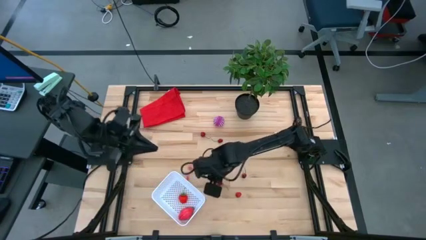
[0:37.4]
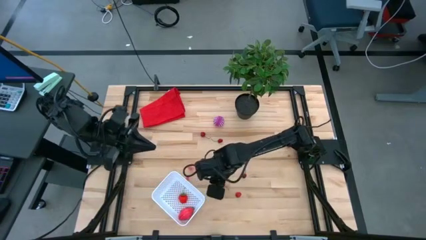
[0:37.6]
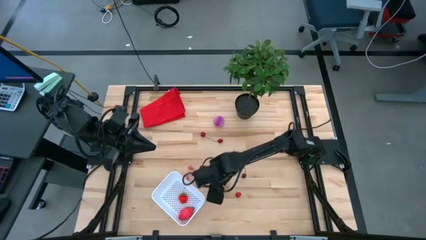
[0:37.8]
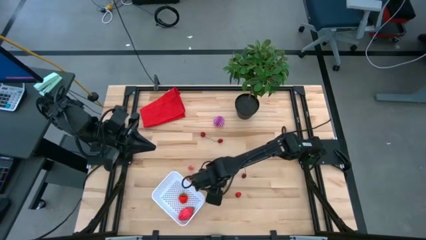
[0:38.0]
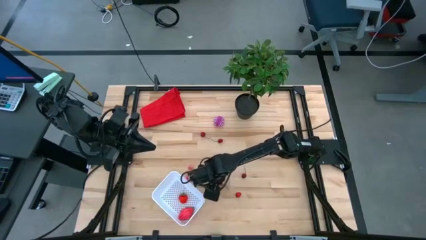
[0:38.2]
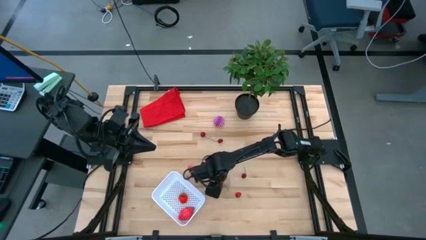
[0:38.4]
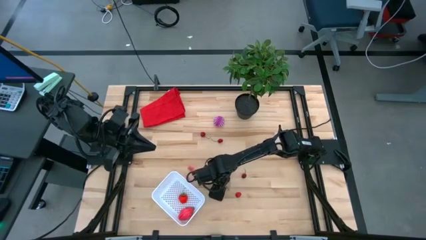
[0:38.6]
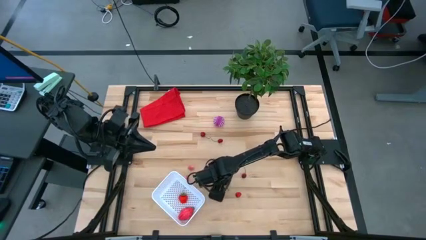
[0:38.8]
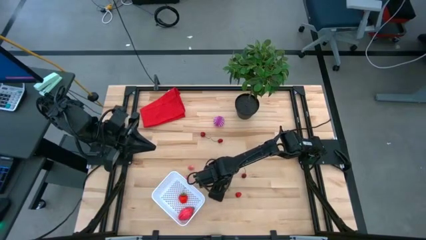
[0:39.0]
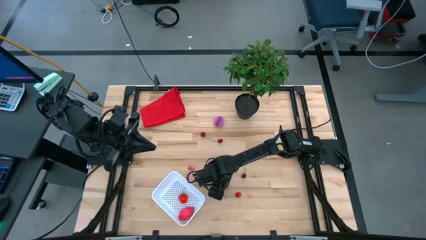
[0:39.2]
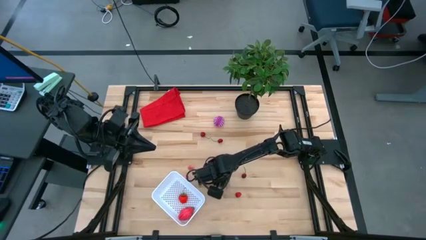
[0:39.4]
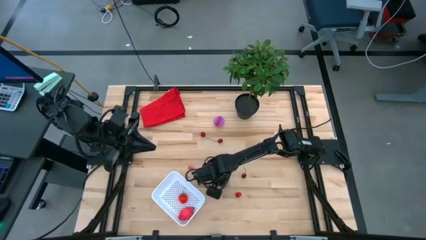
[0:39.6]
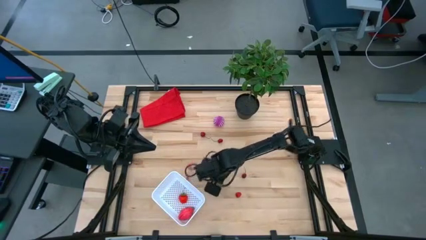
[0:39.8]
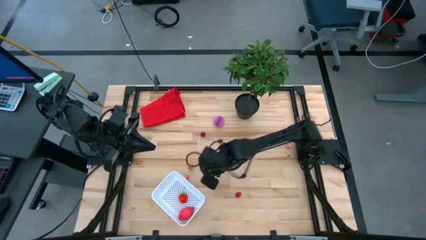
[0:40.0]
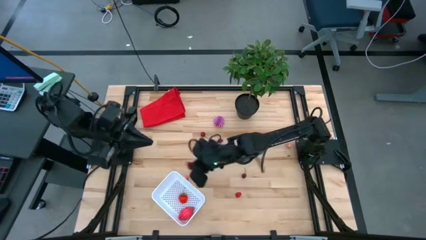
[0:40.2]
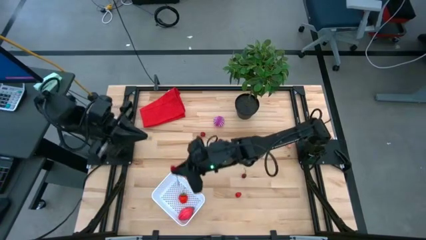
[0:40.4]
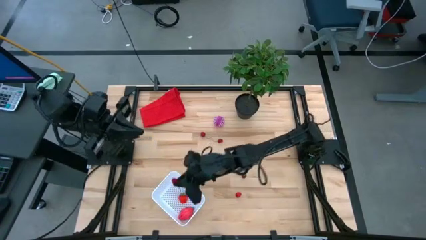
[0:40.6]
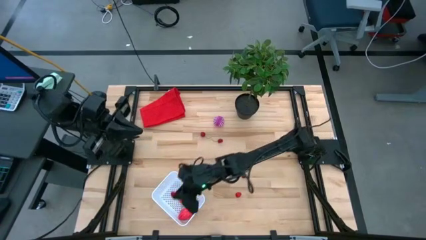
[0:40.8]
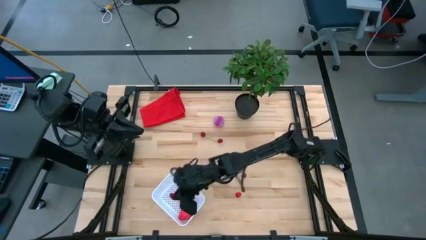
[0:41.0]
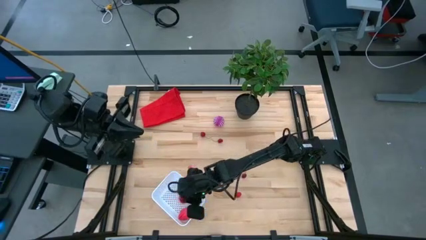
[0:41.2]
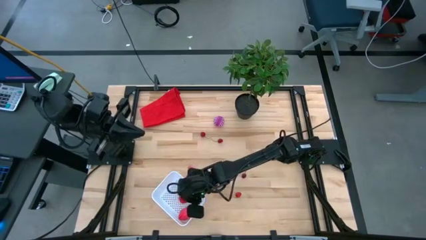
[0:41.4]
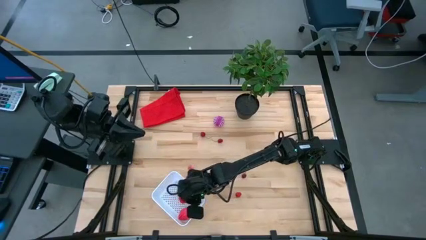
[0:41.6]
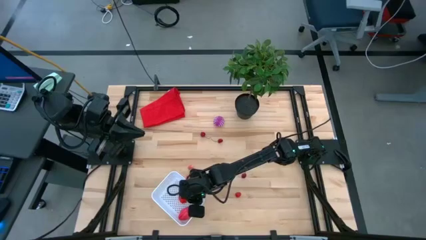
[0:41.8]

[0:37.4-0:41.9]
Task: Pick and placing Produce into tupperware
Put the cherry in the basket

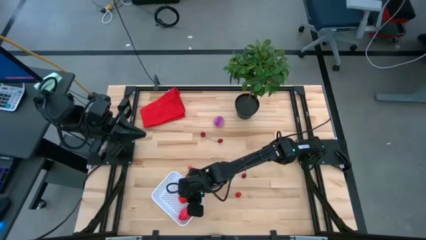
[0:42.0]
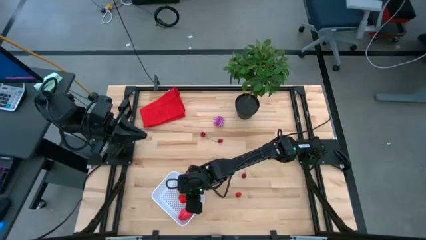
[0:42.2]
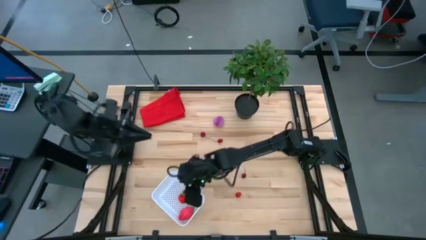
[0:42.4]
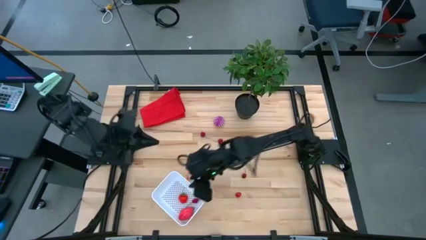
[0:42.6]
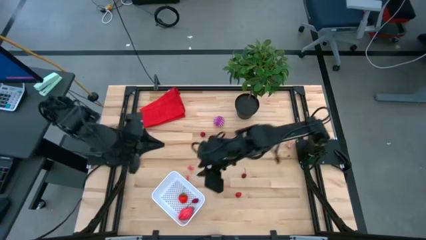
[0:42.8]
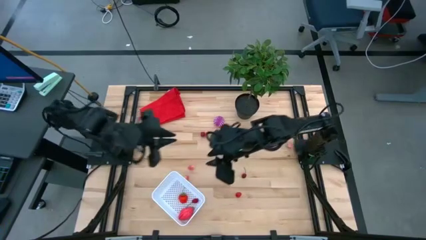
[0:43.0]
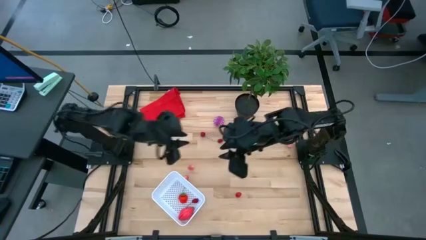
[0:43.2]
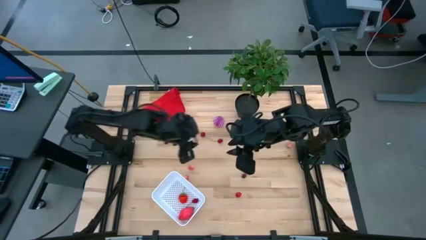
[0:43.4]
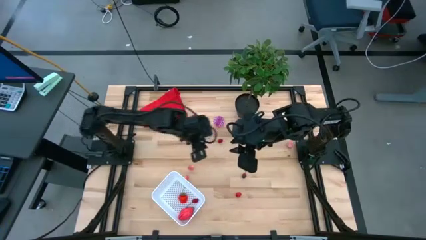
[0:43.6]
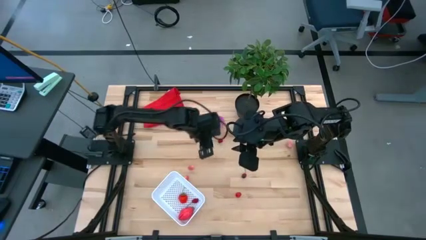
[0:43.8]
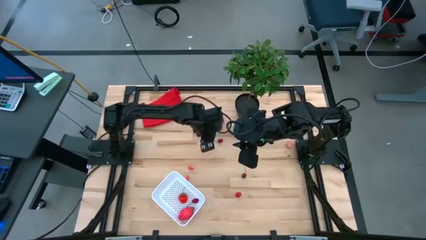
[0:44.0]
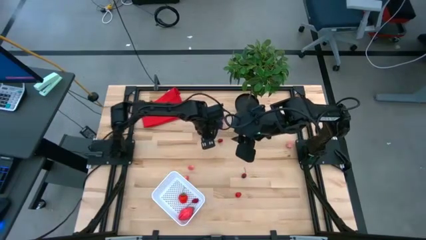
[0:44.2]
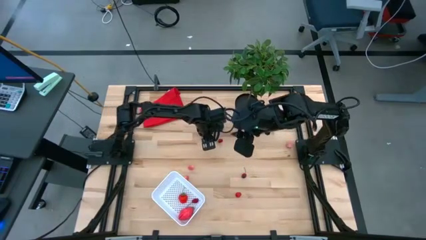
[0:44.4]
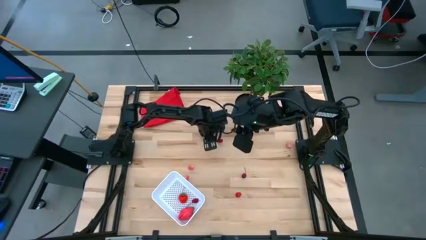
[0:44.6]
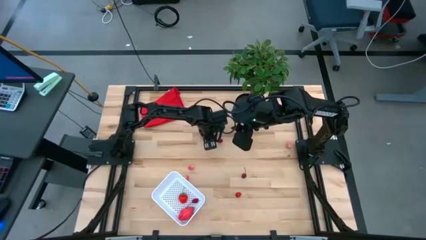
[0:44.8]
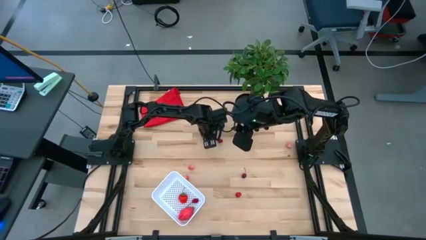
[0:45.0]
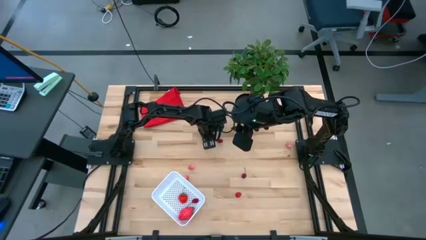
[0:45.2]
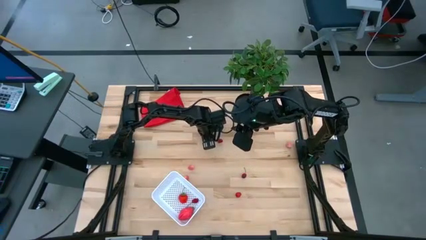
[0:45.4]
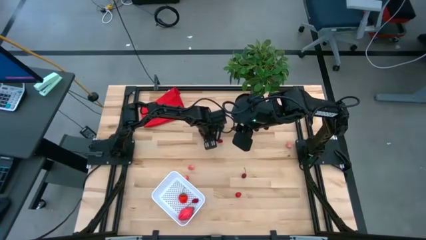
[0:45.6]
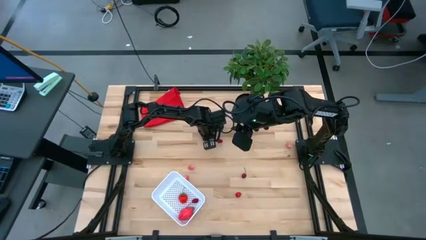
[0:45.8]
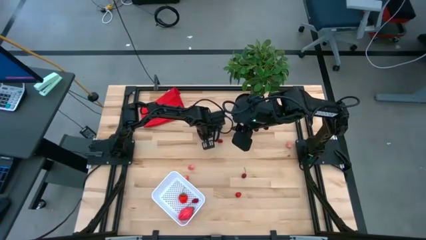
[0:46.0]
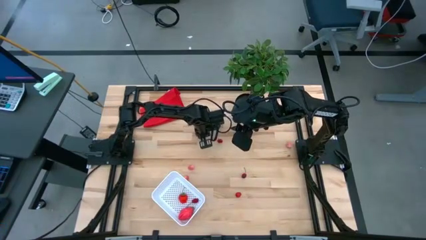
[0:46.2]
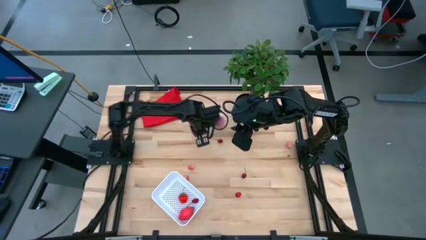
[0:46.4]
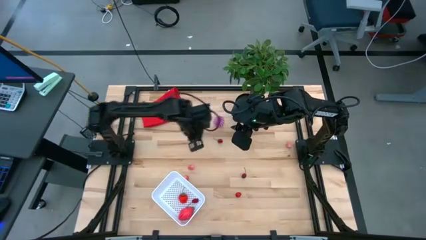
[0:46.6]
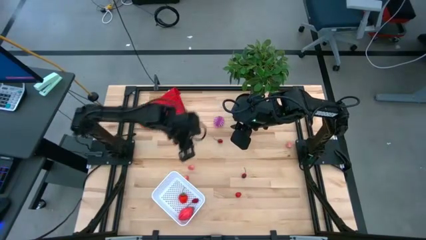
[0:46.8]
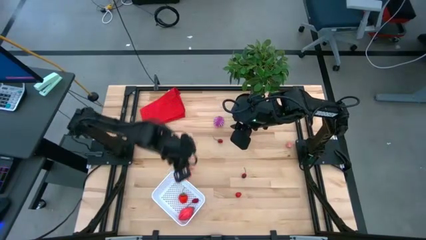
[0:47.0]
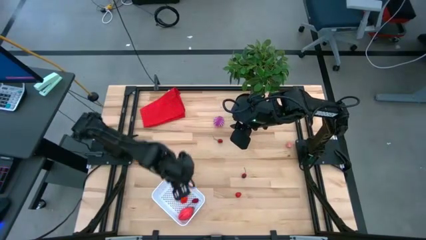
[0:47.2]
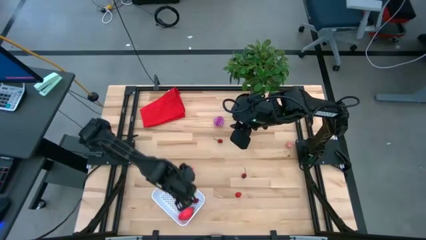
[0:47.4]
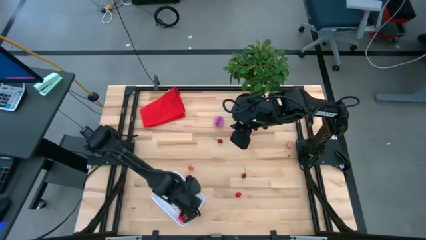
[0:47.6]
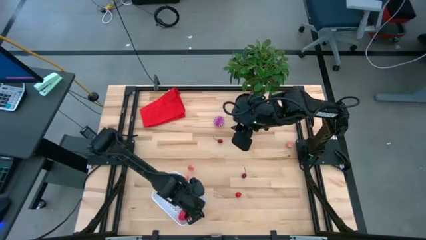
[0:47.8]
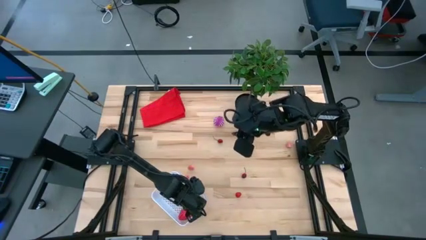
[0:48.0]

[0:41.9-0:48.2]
Put the left cherry in the basket

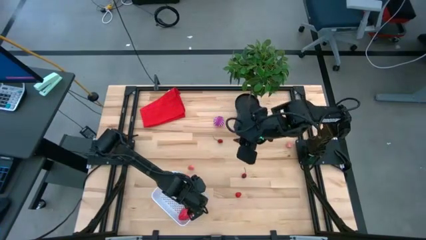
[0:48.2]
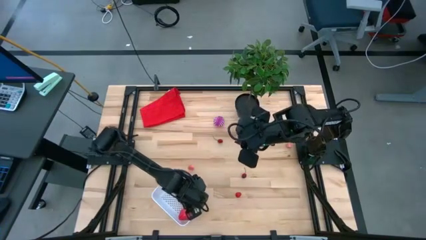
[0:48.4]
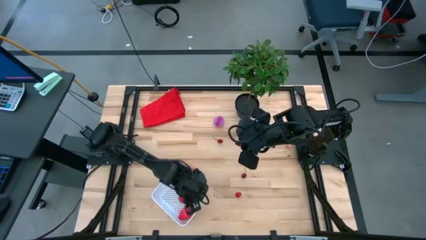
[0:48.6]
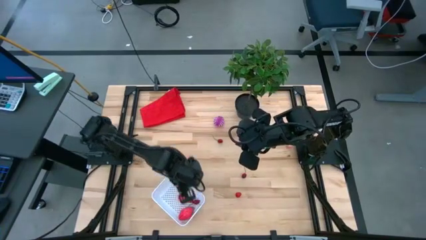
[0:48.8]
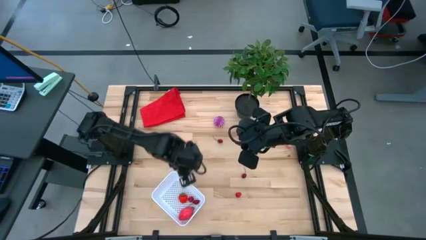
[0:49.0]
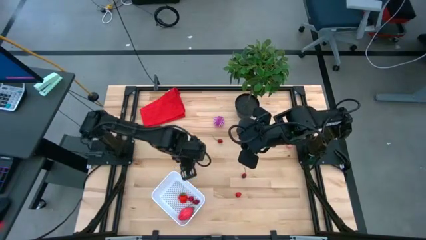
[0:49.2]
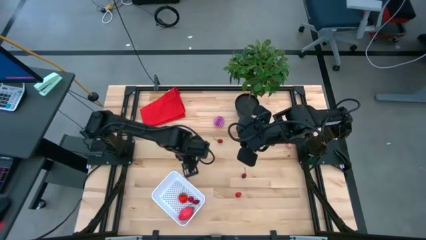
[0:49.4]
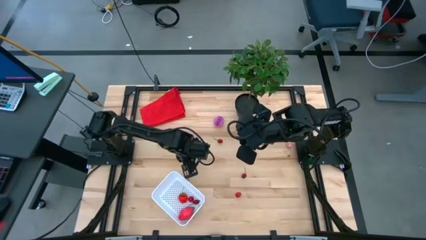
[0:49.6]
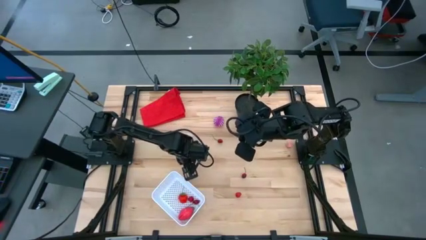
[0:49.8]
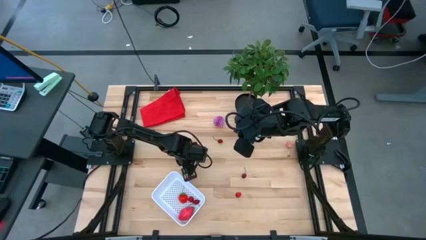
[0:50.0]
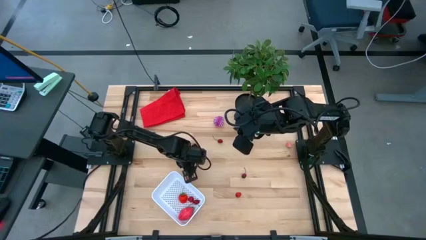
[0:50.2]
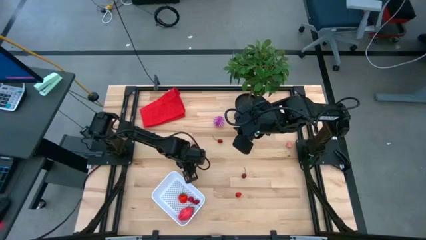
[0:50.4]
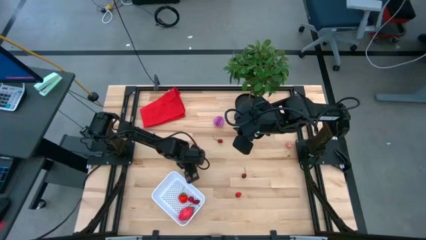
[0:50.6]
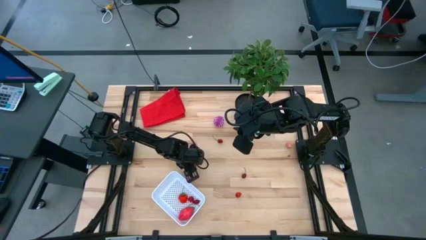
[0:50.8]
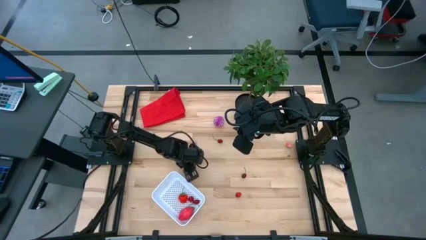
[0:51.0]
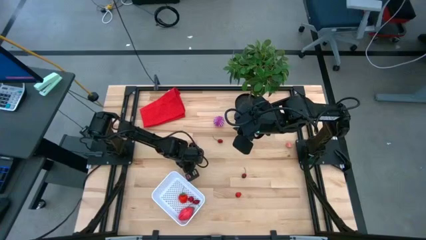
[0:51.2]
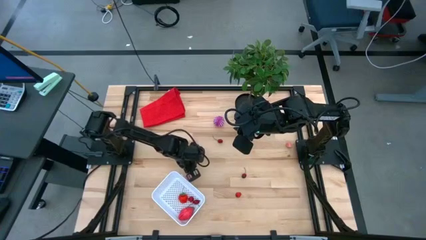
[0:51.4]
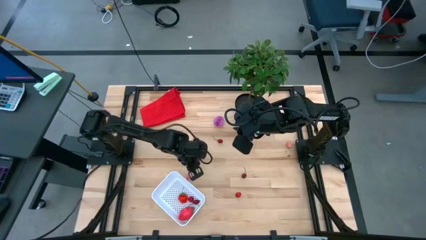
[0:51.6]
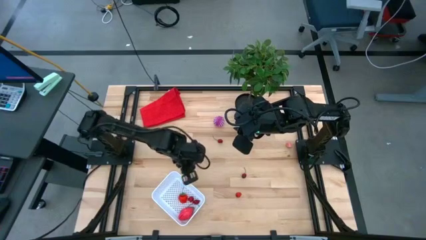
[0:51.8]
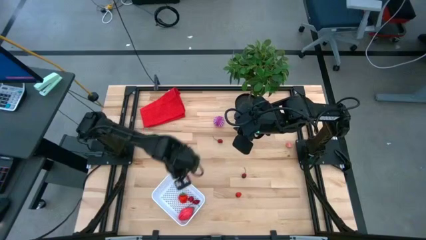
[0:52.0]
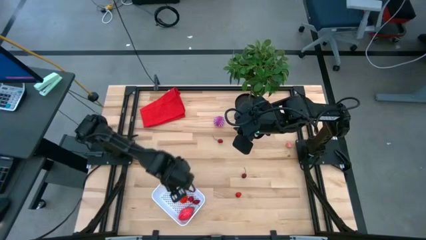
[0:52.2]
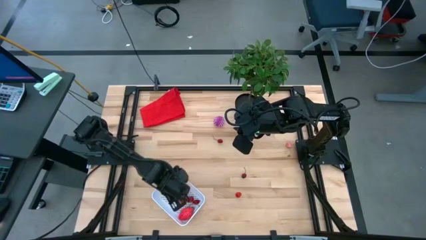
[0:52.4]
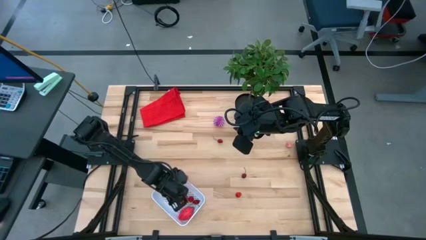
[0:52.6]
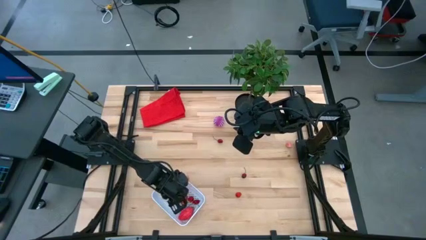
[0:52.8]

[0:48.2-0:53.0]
Put the top peach in the basket
